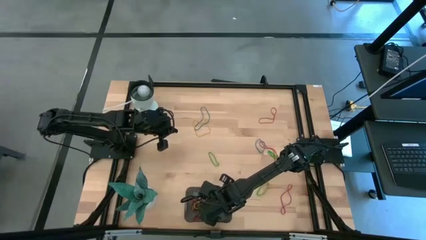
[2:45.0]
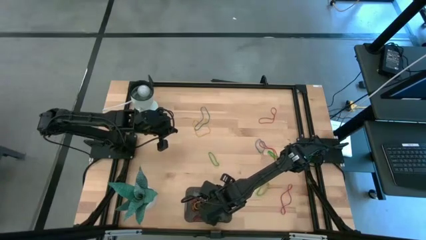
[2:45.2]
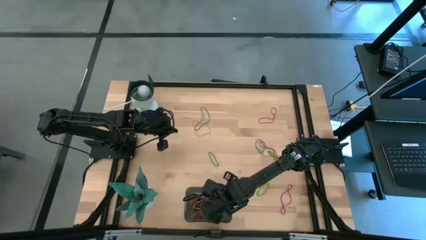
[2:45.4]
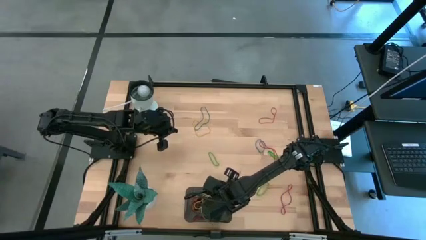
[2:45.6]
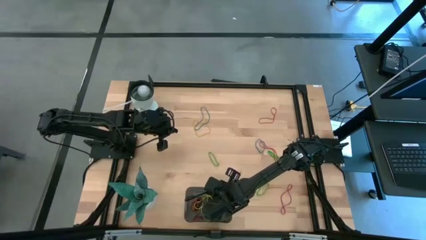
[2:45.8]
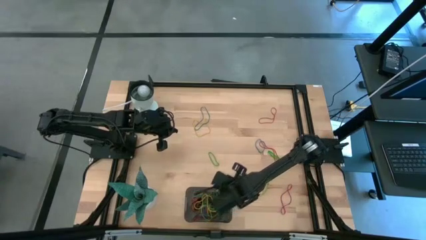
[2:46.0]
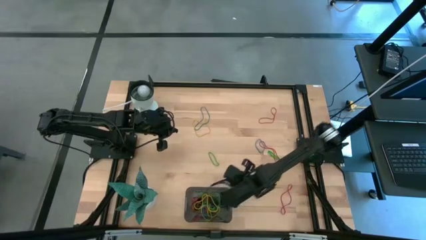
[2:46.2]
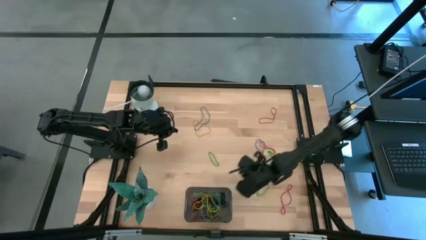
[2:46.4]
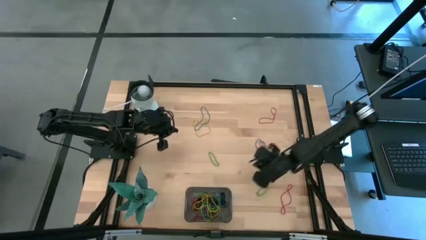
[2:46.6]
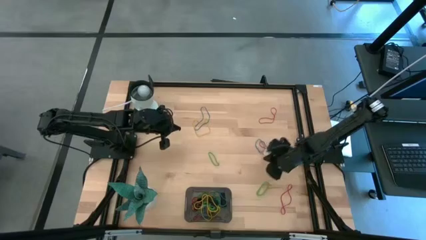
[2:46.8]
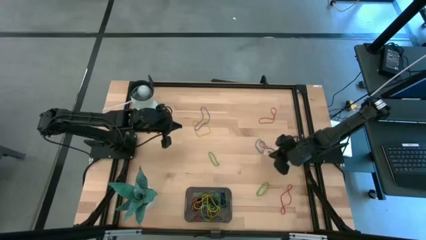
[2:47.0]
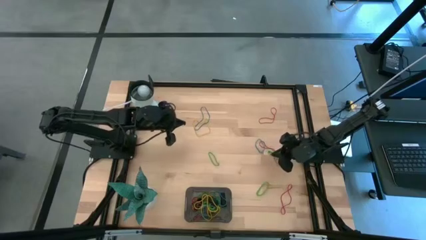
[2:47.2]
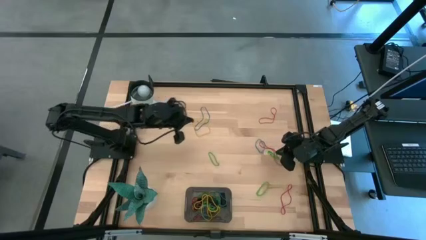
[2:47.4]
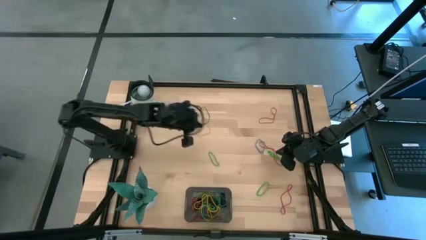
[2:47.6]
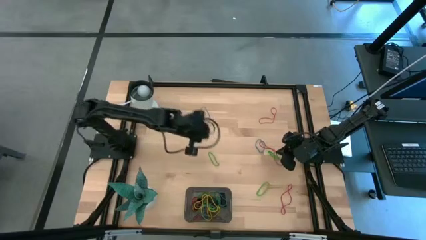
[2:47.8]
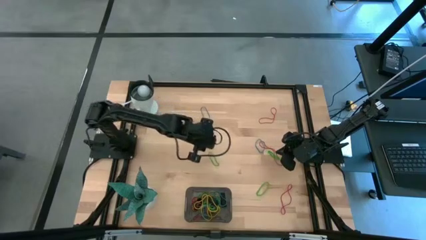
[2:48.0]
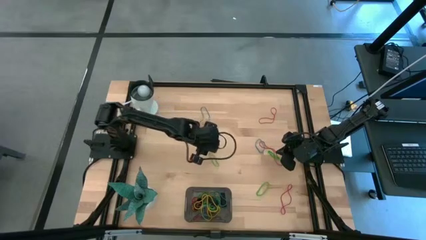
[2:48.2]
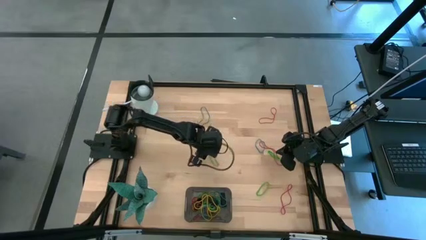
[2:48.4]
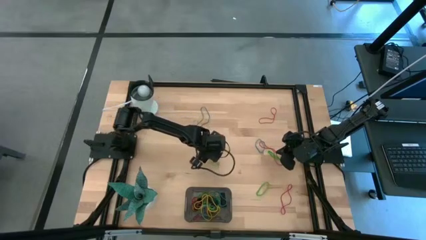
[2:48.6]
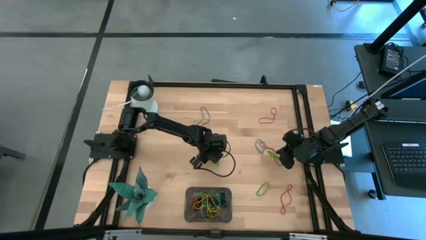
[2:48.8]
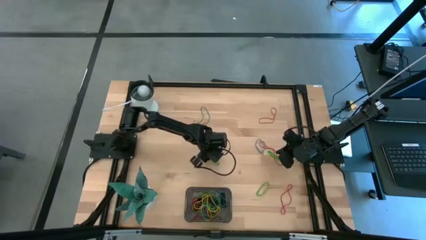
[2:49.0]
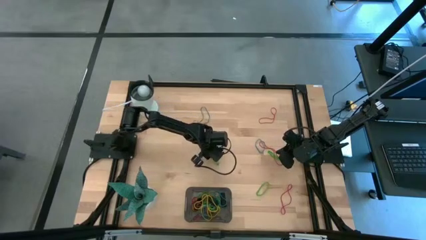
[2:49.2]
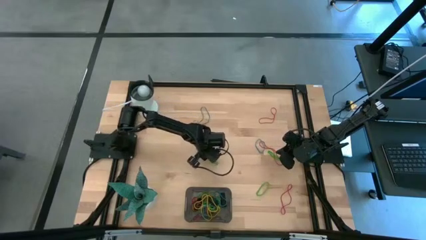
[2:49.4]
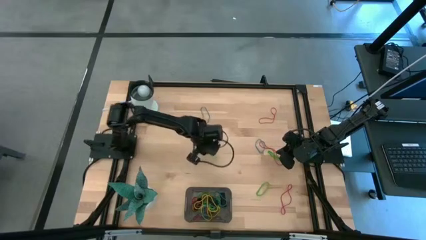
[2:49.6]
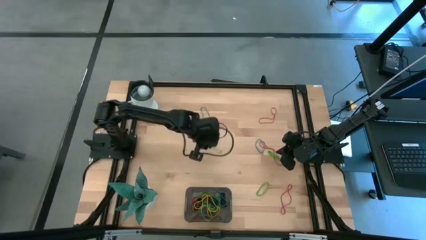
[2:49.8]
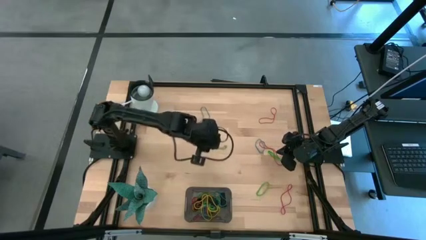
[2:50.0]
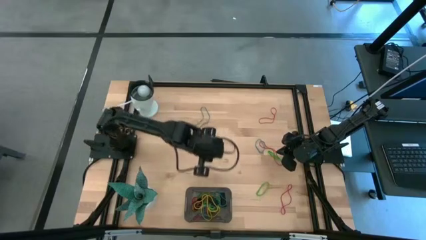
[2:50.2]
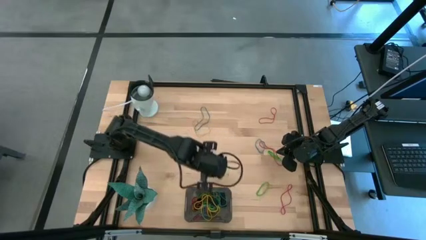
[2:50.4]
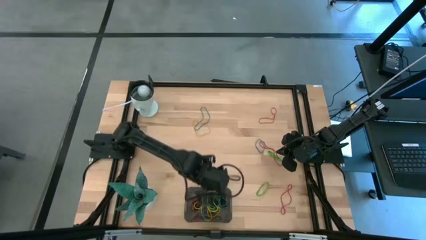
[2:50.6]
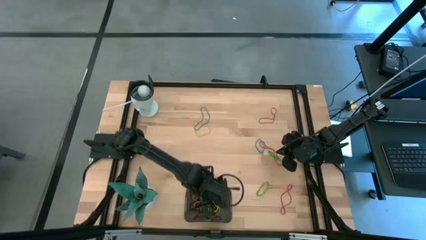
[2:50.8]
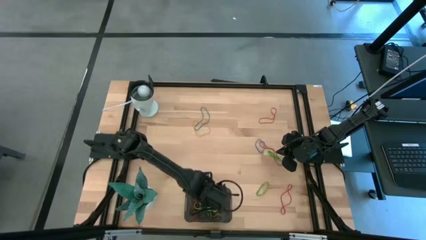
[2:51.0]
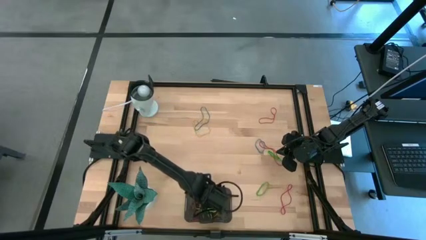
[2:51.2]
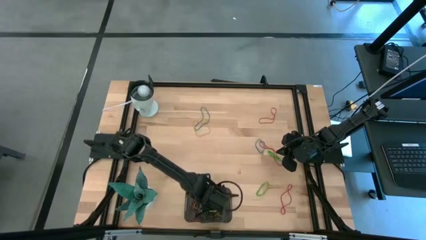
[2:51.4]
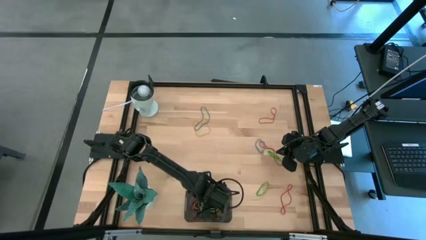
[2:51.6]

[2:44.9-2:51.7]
Task: Pick and place rubber bands into bin
Put the green rubber band into the black bin

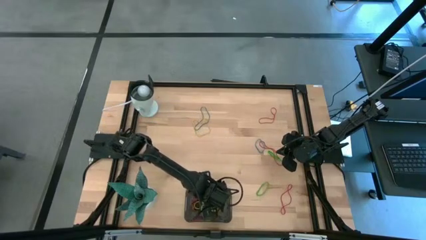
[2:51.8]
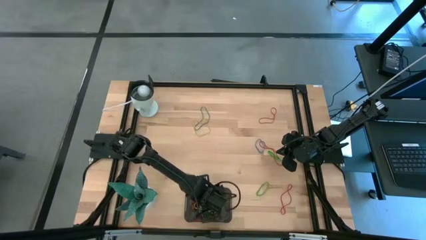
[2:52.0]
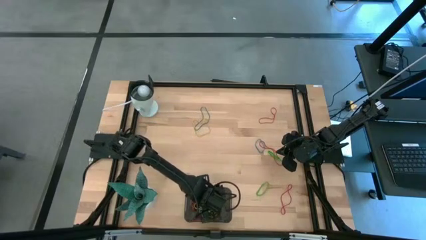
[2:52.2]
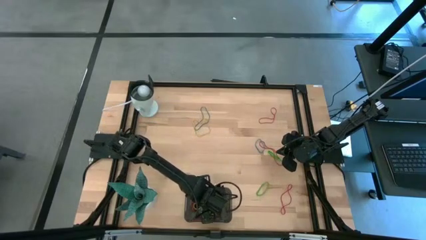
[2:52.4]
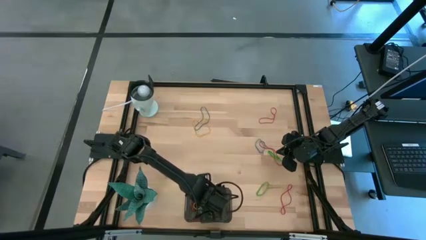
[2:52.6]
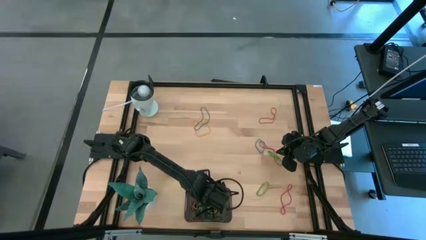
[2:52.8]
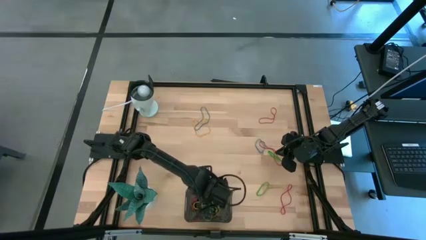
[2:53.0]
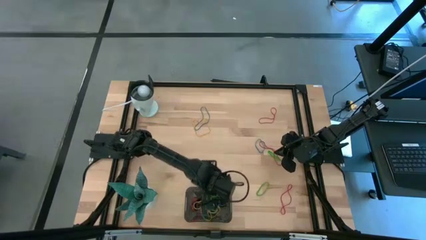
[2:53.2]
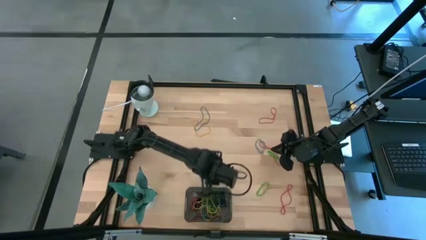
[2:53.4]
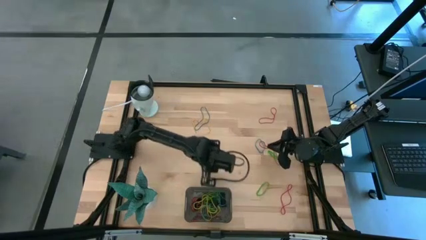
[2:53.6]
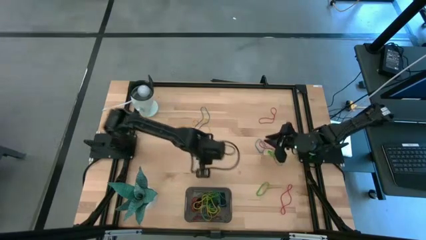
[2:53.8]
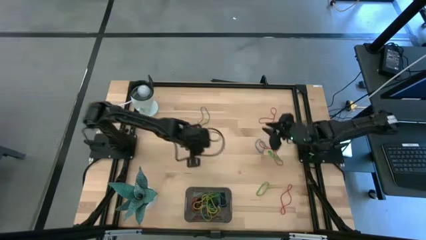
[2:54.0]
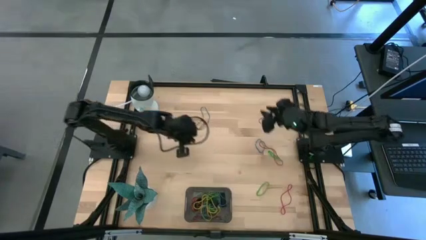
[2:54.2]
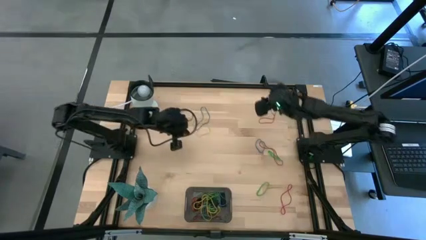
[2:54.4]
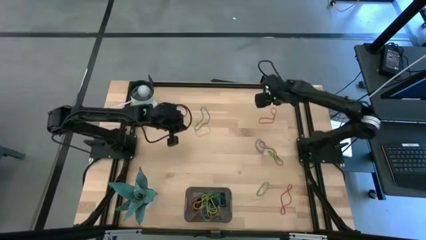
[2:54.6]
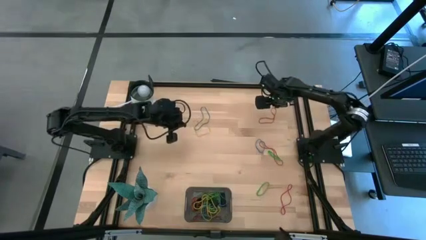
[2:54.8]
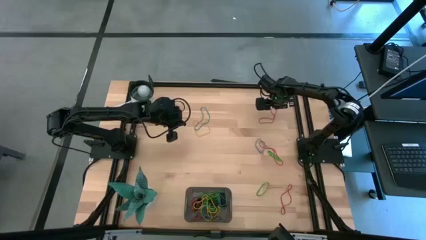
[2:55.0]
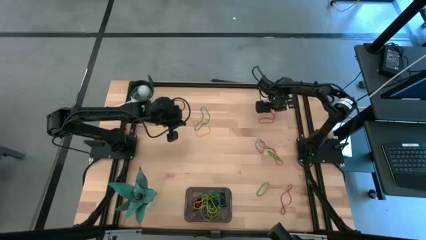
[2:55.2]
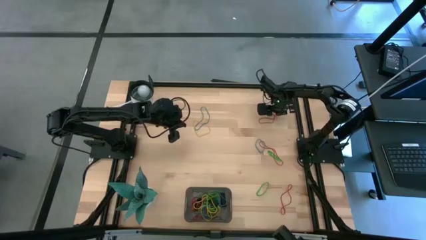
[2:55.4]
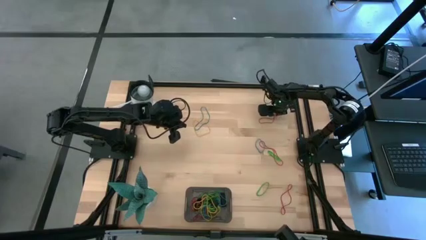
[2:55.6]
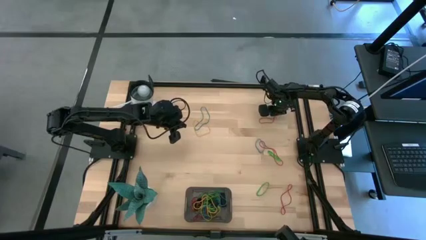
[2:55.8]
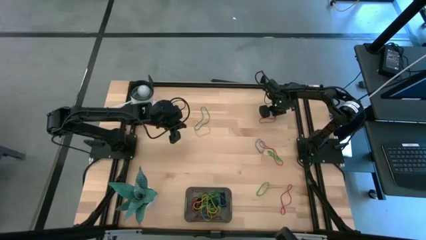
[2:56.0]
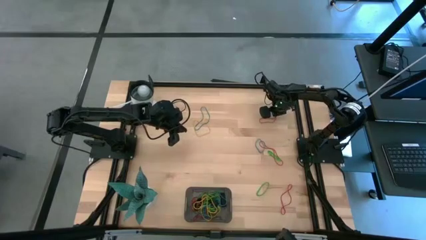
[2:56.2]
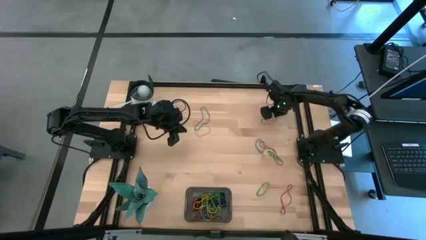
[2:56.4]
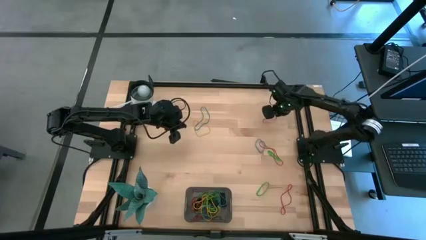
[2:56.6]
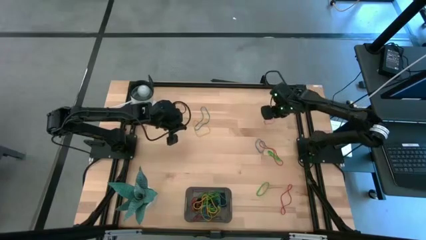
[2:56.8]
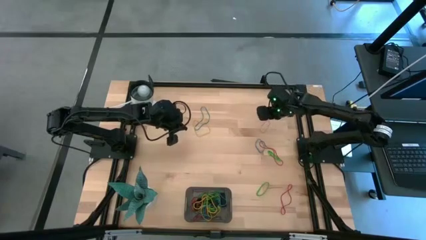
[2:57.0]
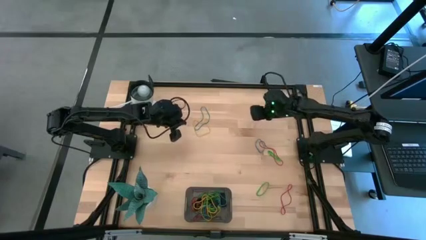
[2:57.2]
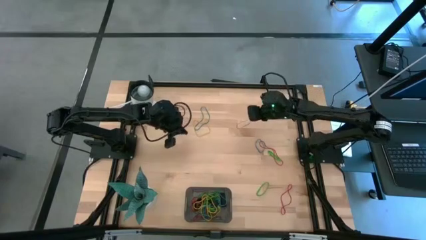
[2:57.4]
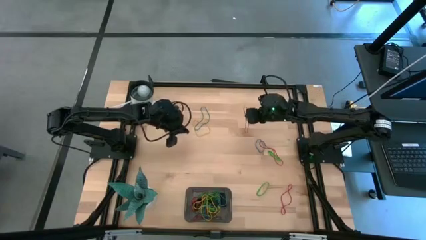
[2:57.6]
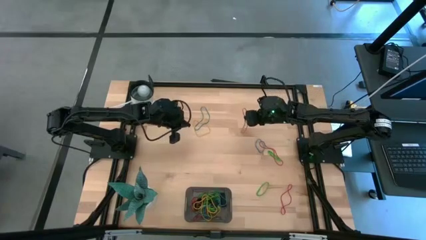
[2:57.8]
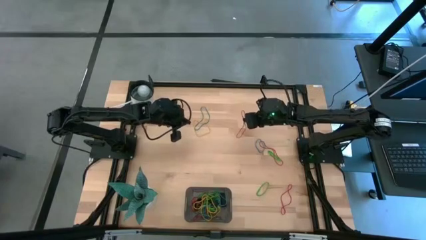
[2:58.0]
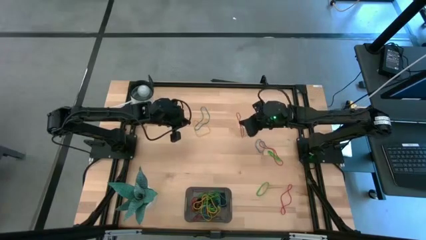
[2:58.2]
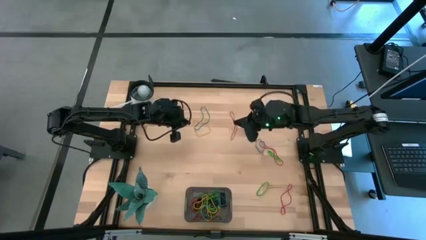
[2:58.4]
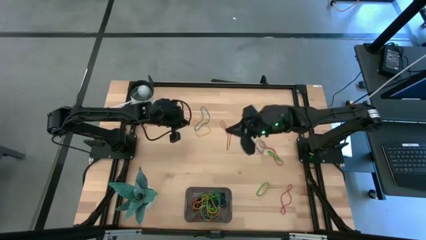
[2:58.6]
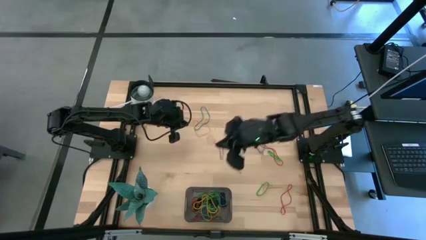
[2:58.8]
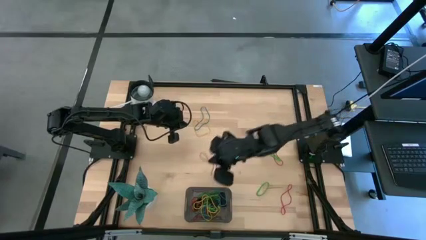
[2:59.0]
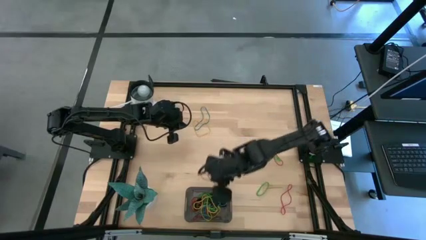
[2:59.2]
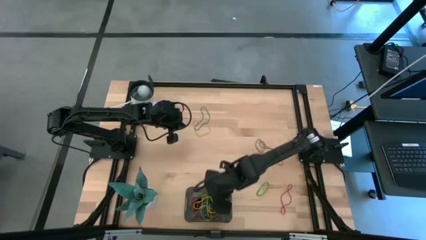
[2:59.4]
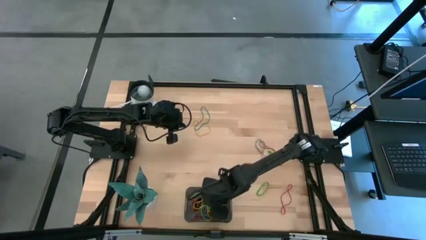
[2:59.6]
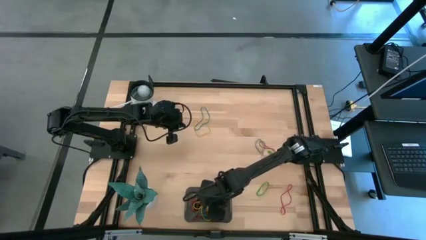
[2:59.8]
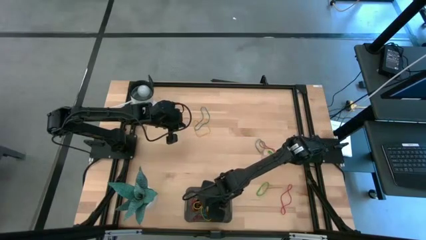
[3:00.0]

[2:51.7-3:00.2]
Put the red rubber band into the black bin

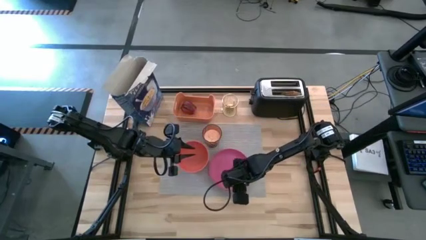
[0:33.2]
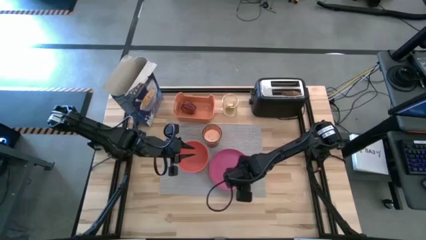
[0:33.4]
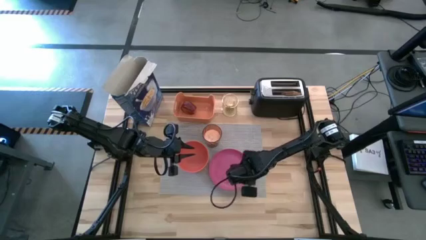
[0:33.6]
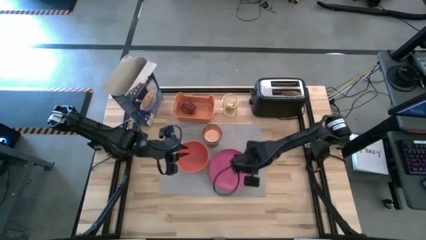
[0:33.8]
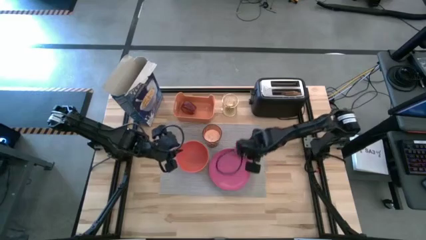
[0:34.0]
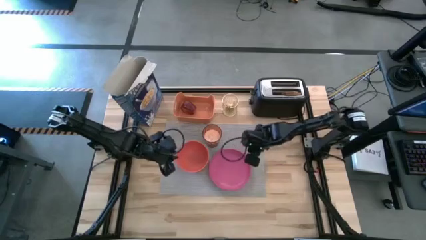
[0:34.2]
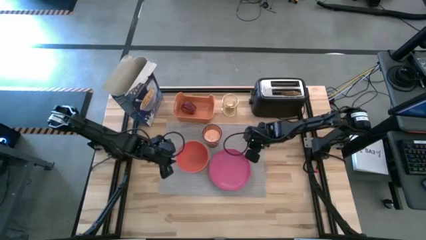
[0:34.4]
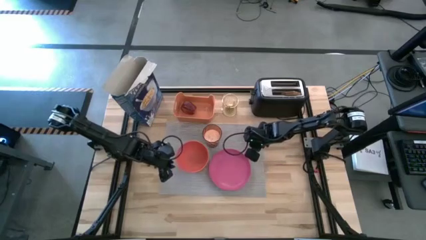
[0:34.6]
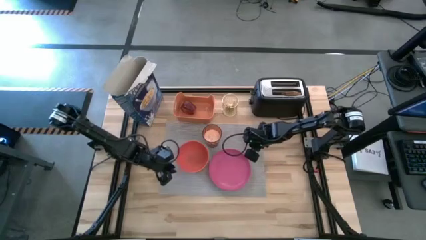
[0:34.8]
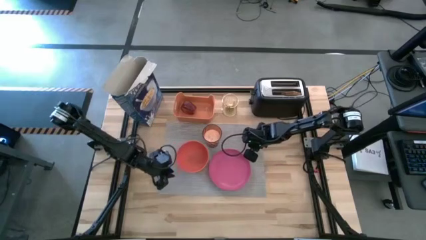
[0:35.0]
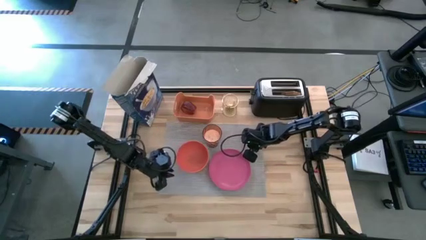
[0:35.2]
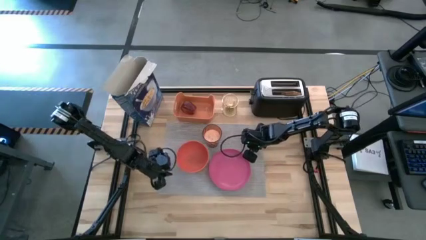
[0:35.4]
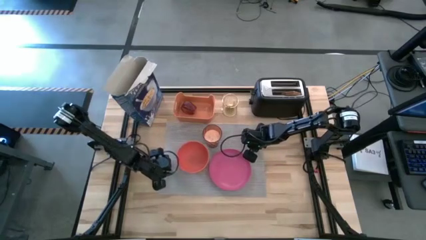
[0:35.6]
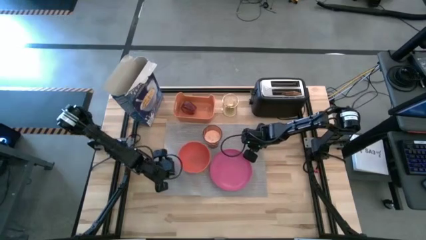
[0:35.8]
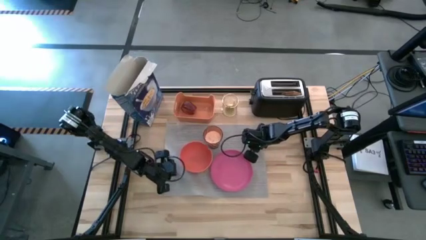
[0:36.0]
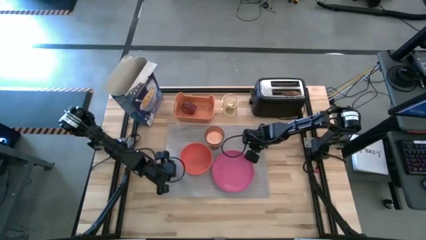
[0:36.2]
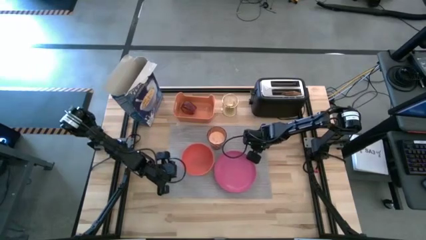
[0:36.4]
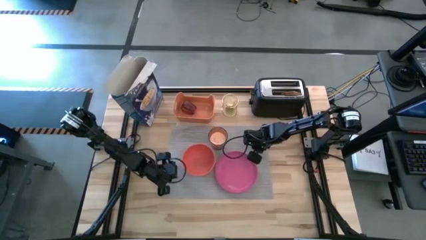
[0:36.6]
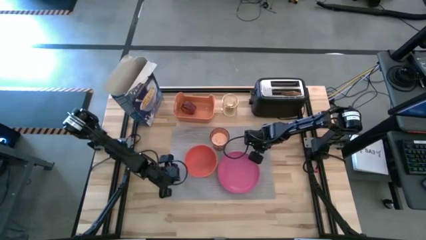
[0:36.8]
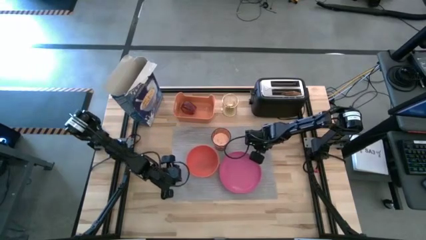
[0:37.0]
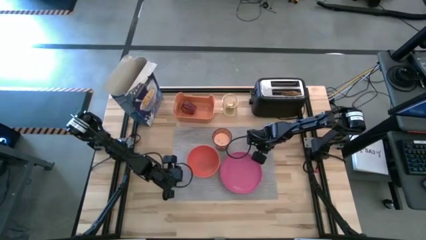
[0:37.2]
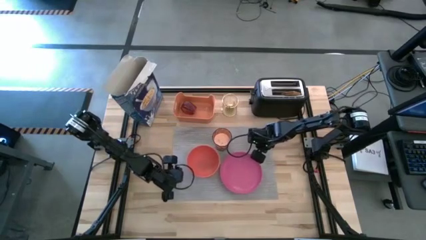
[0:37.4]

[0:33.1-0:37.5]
Task: Arrange a breakfast setting
Adjust the gray tablemat
